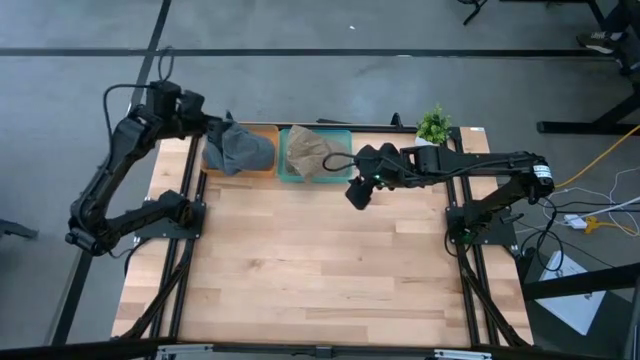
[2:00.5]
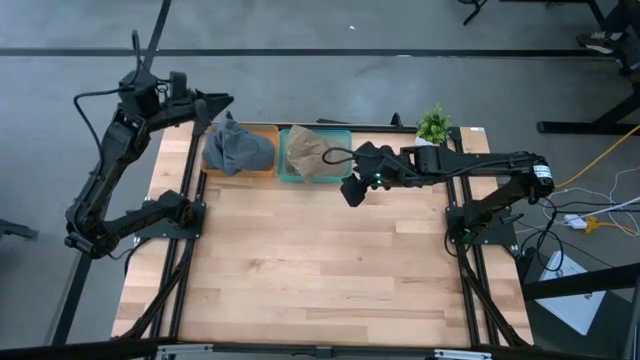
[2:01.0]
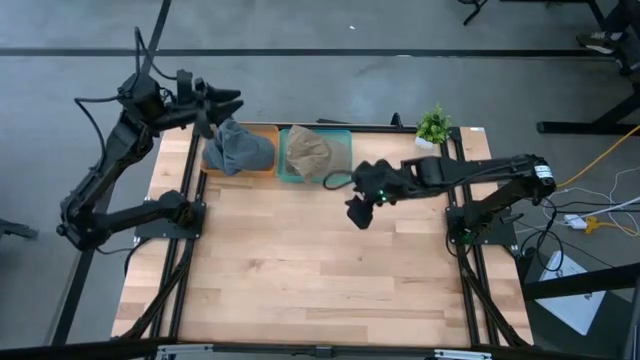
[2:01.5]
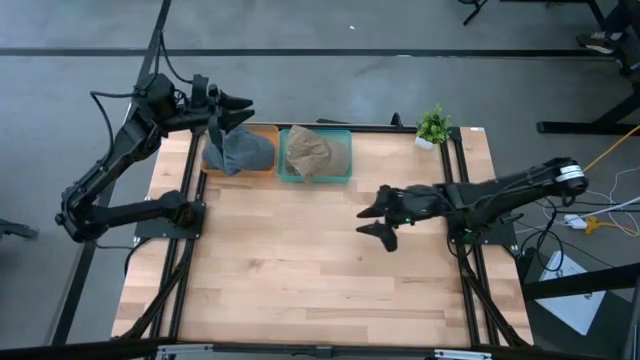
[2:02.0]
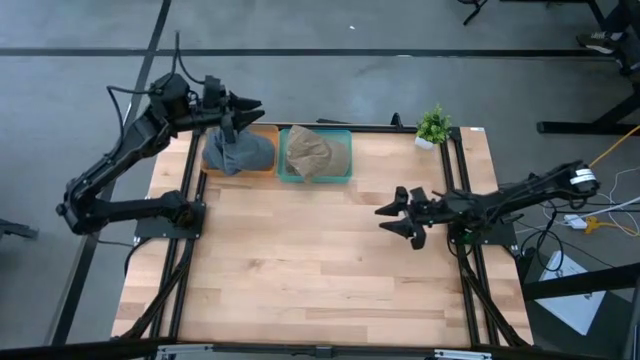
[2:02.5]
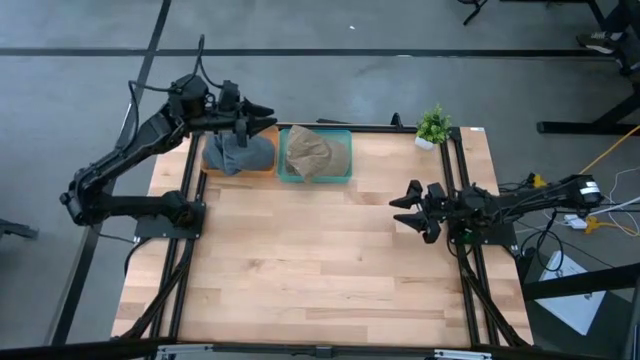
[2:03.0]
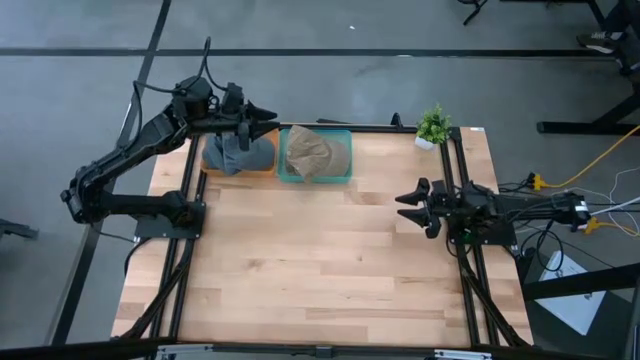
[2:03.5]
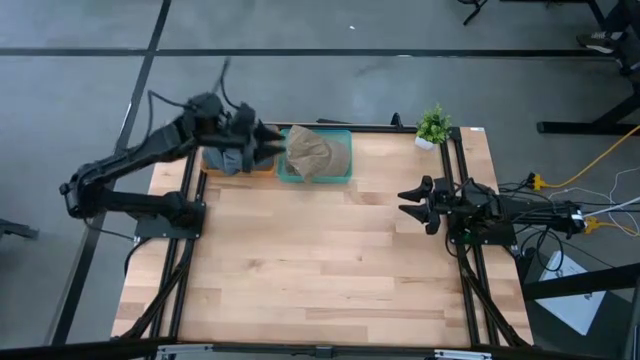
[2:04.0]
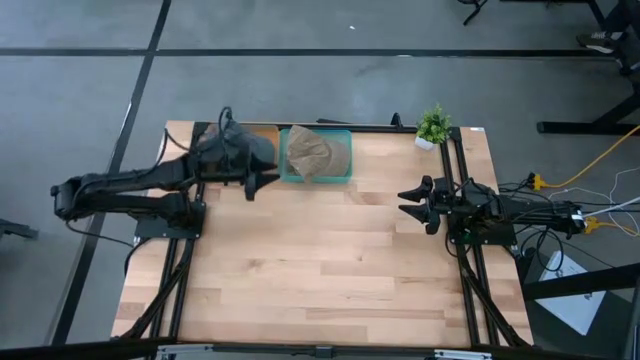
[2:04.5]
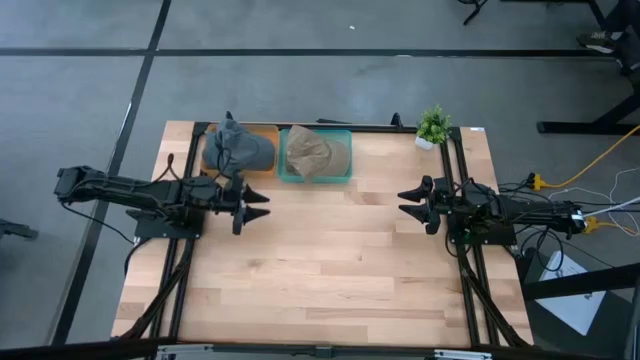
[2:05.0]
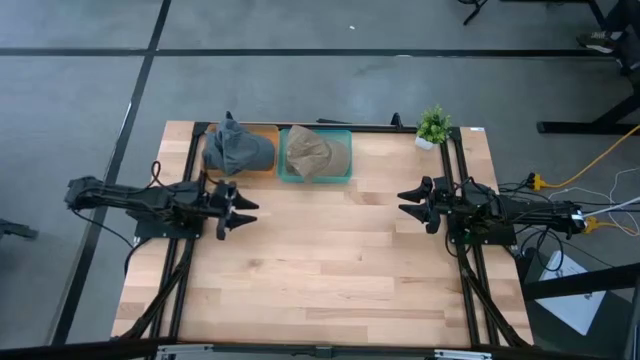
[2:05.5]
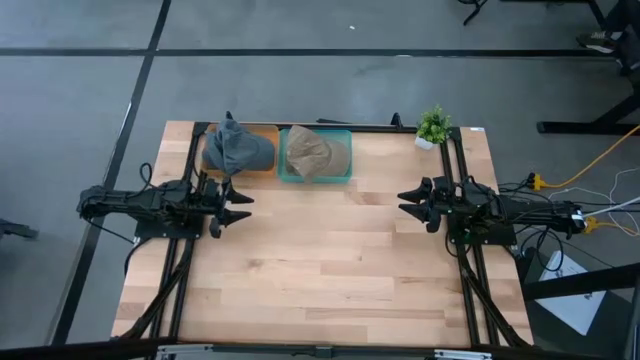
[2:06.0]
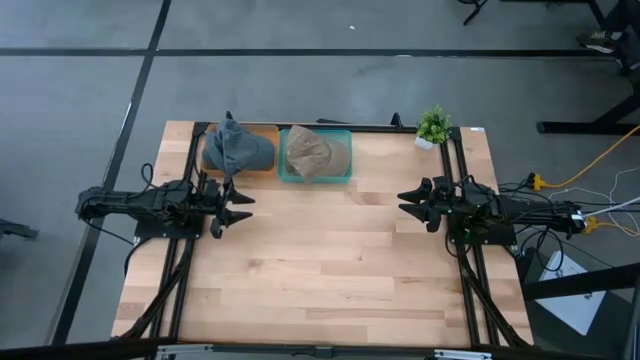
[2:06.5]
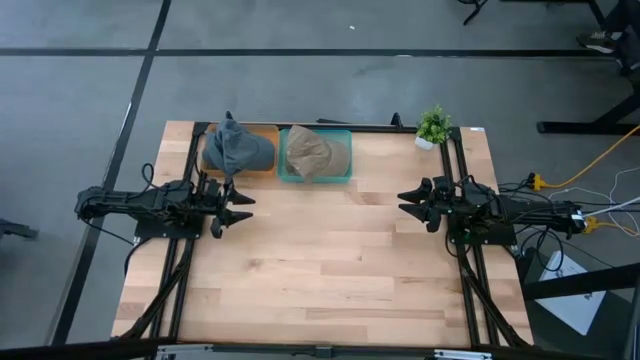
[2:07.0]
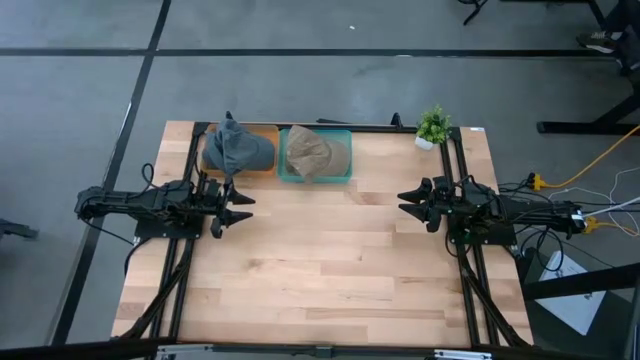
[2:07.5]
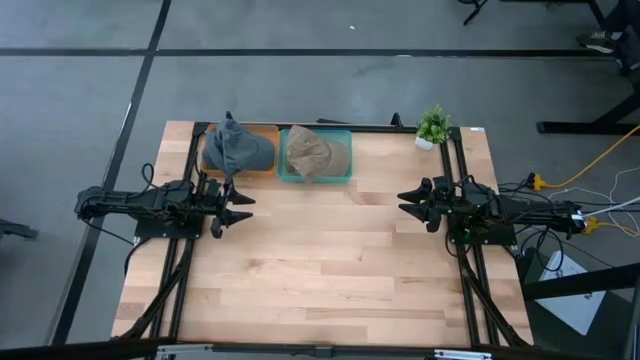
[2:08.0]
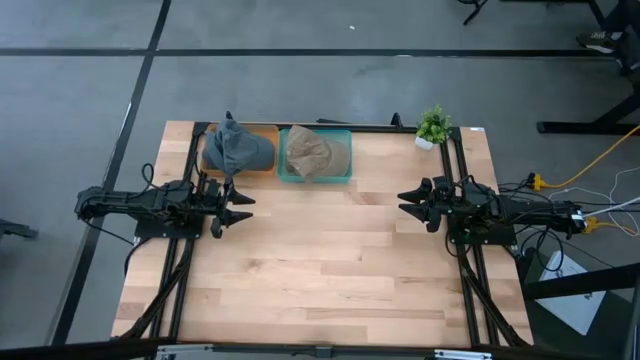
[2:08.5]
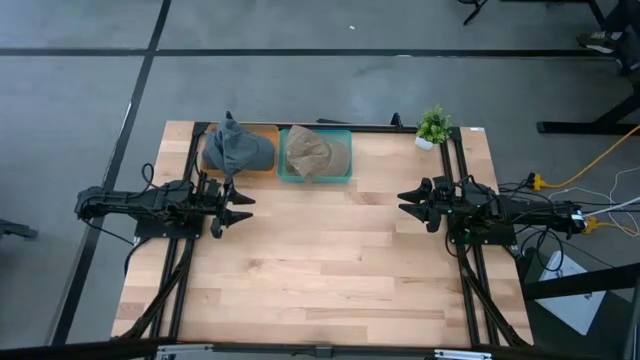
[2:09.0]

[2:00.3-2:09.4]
Task: Pick & Place hat
Return to Home Position

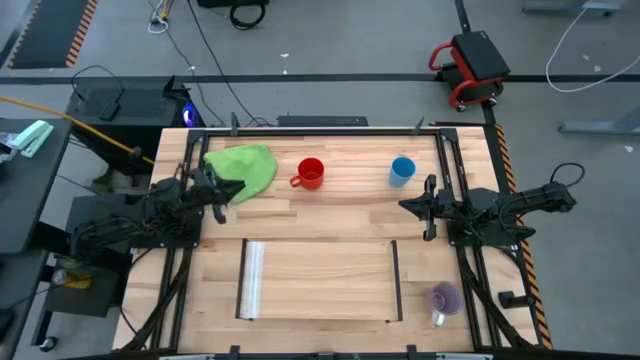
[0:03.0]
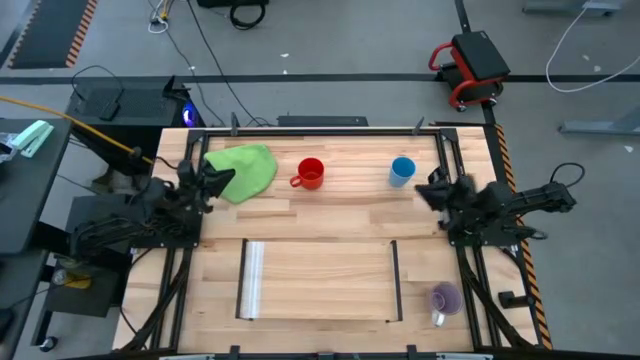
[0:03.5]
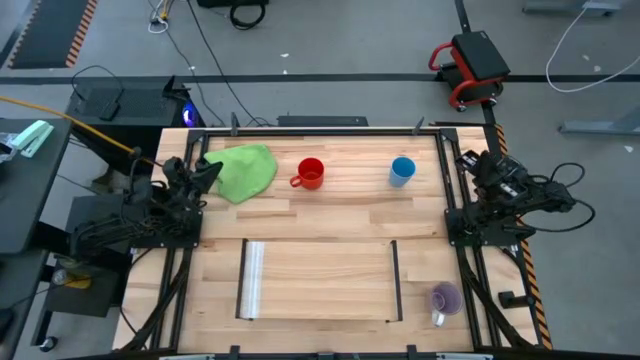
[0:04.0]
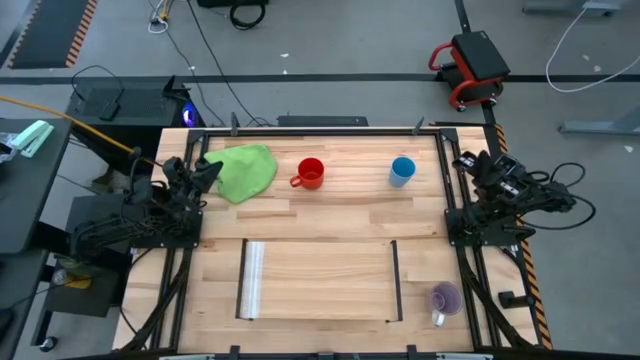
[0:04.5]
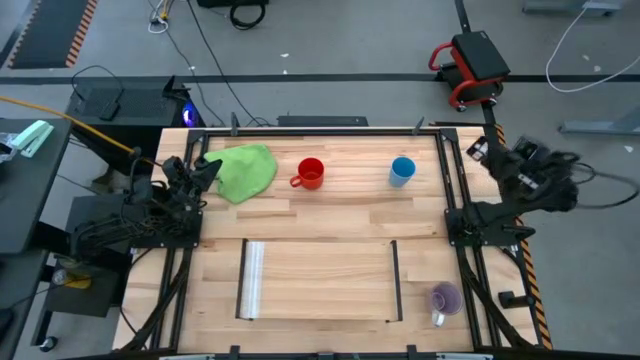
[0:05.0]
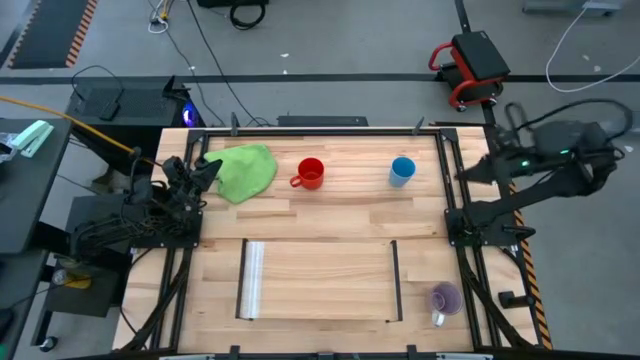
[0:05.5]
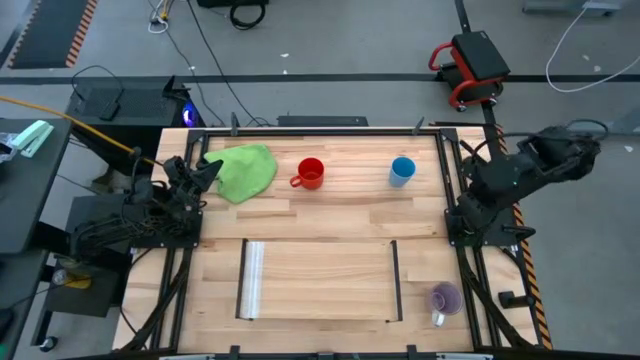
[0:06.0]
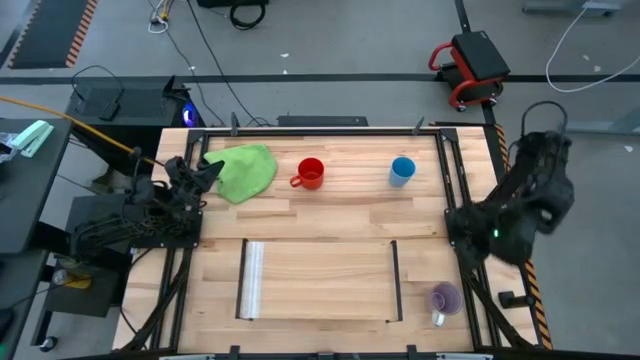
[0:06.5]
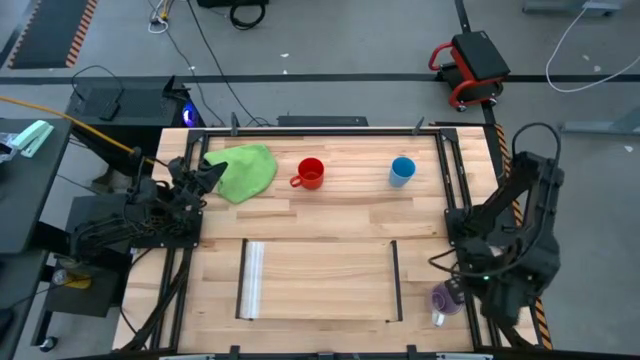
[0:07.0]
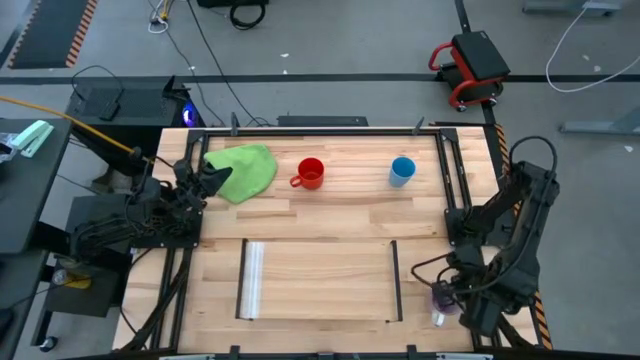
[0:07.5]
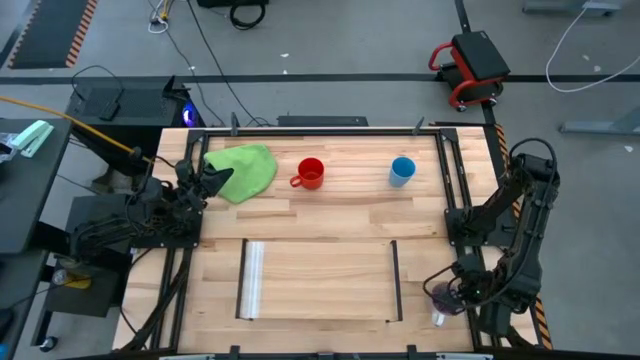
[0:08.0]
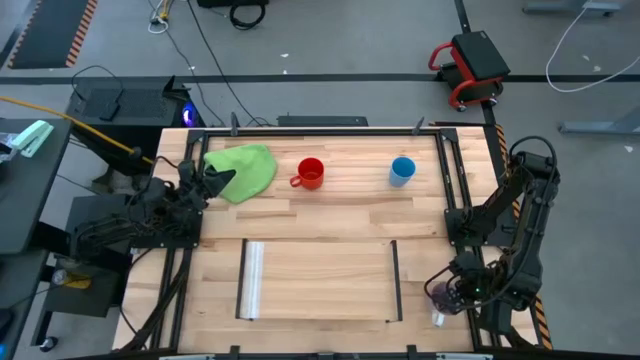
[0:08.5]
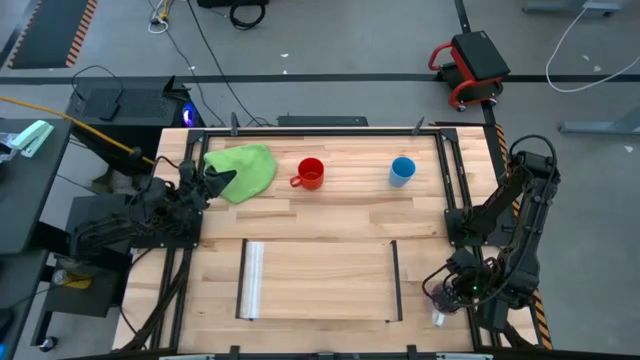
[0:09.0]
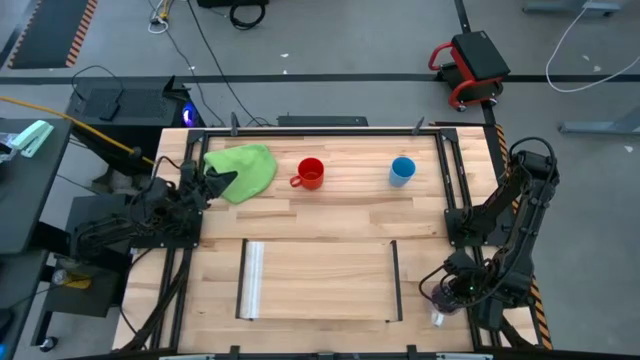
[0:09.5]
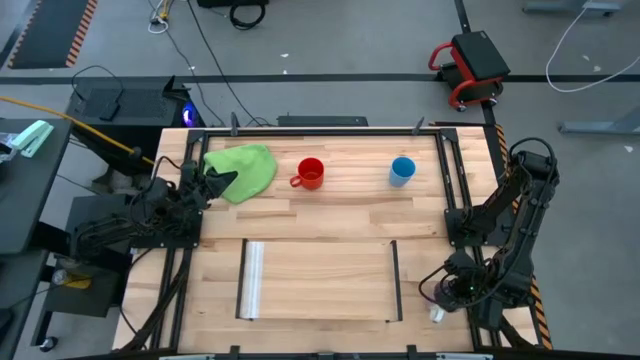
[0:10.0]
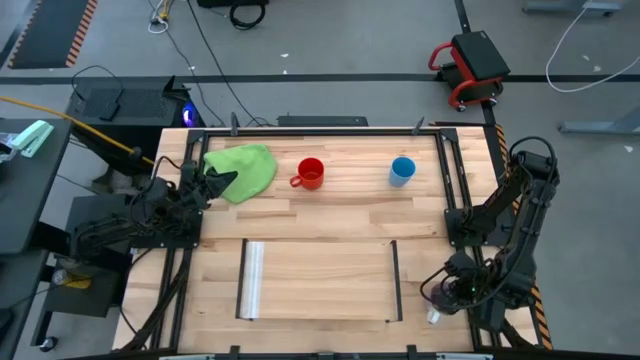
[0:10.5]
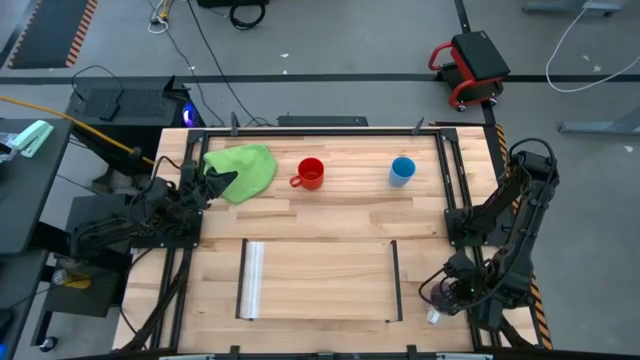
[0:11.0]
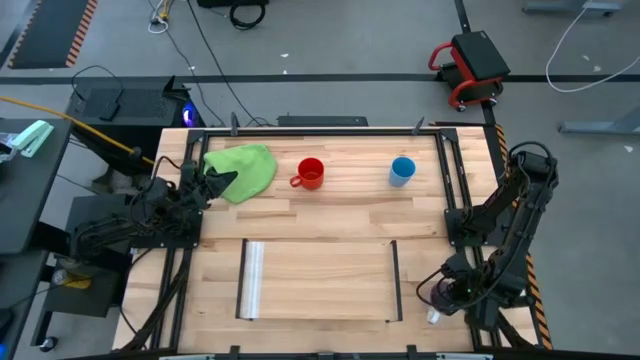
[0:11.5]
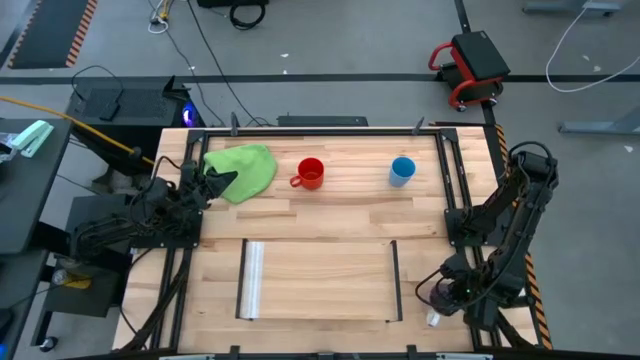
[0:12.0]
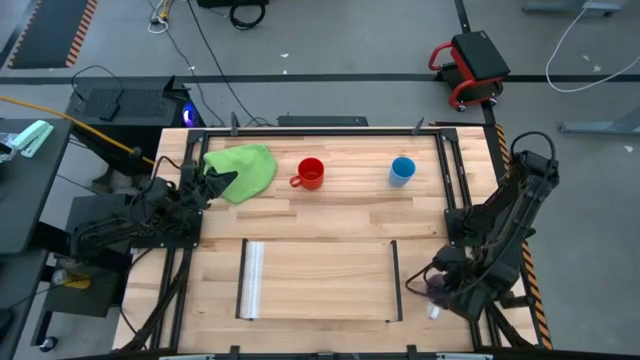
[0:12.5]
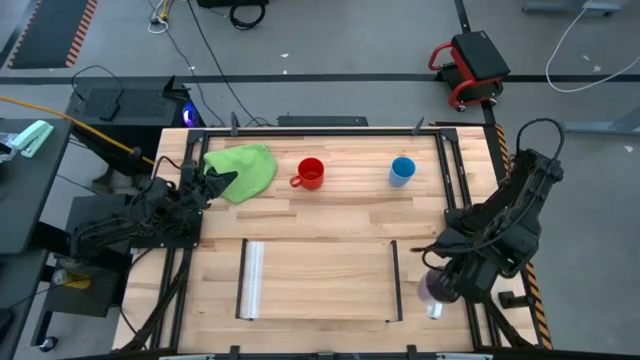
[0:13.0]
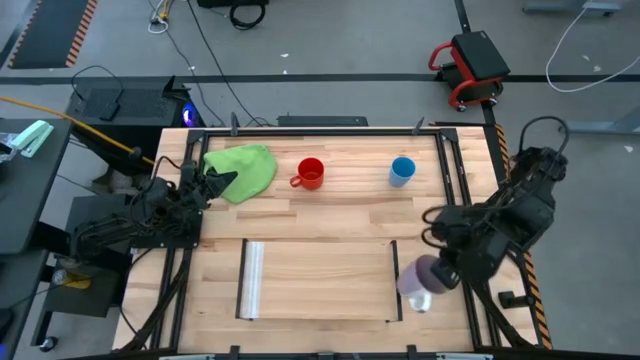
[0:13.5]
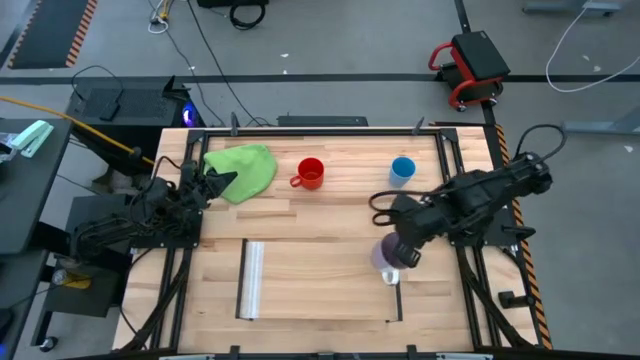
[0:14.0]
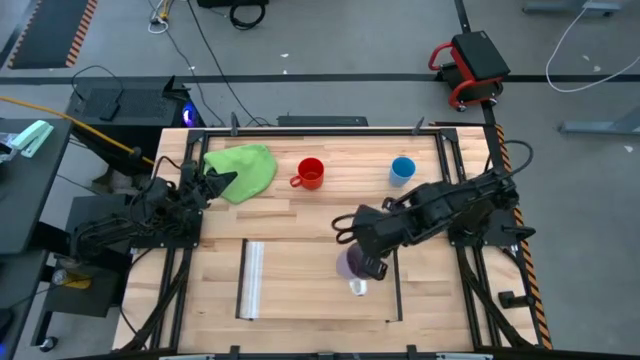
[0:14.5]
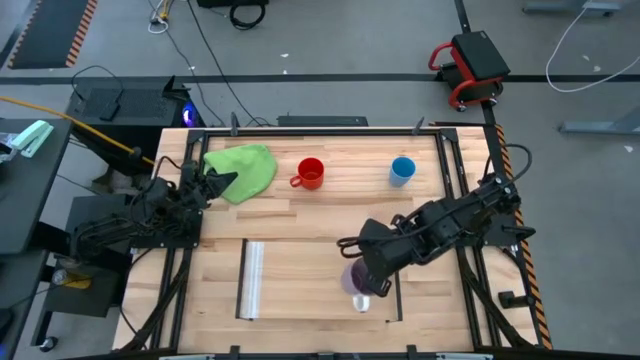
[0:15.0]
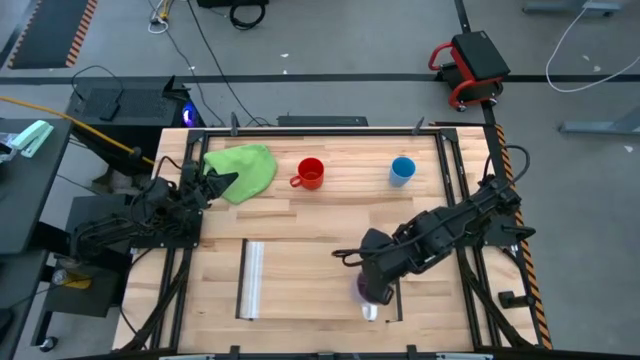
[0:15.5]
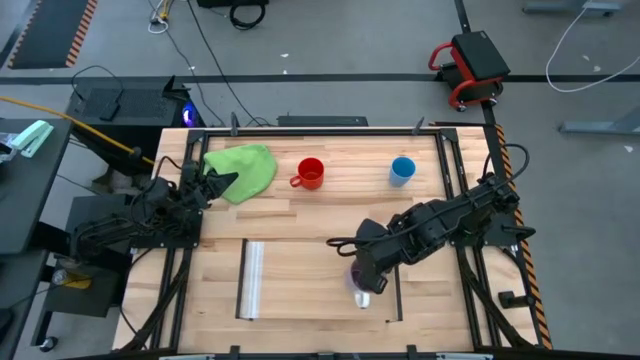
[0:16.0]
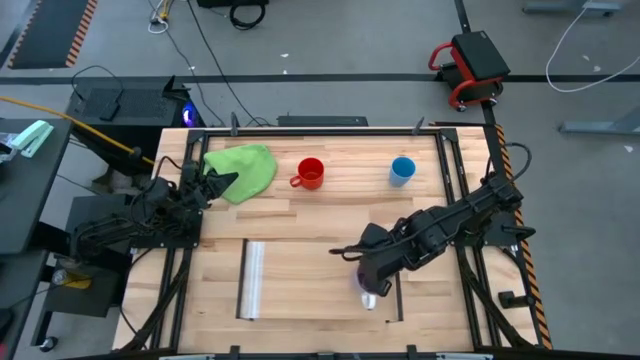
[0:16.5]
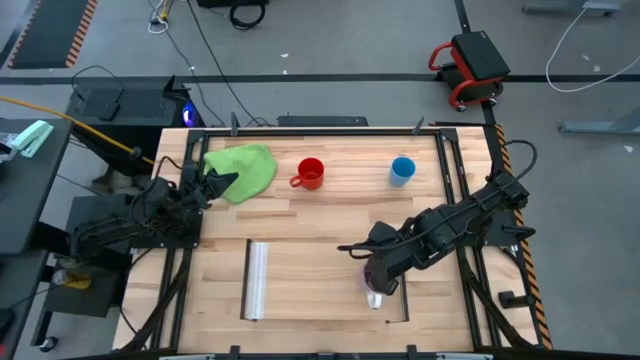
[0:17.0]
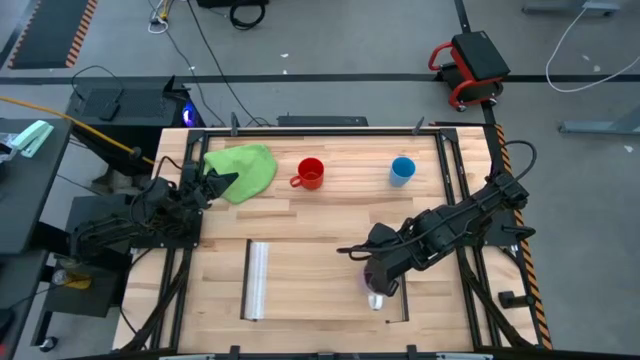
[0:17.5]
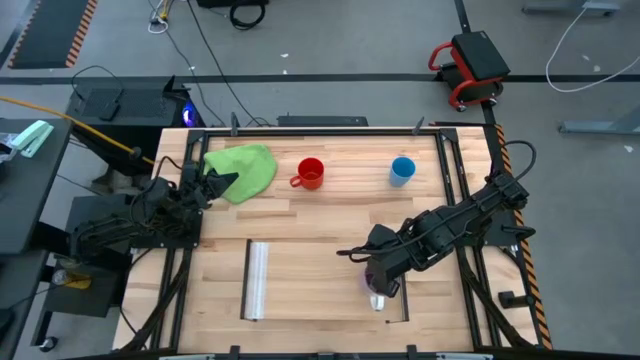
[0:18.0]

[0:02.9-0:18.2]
Task: Stack small to large cups/mugs on shelf
Put the purple mug on the shelf
